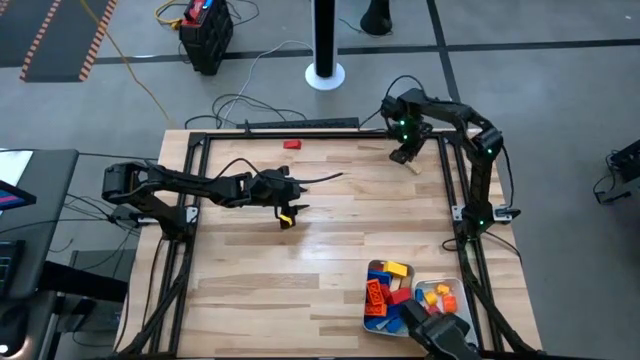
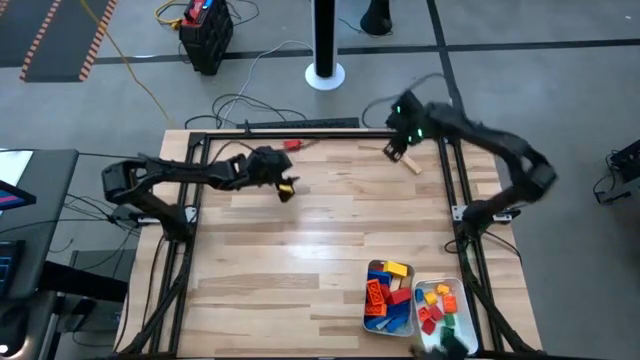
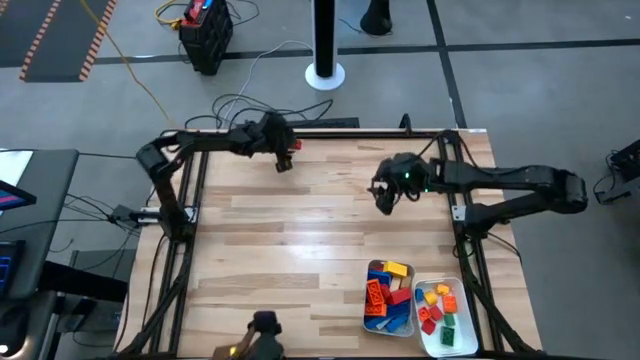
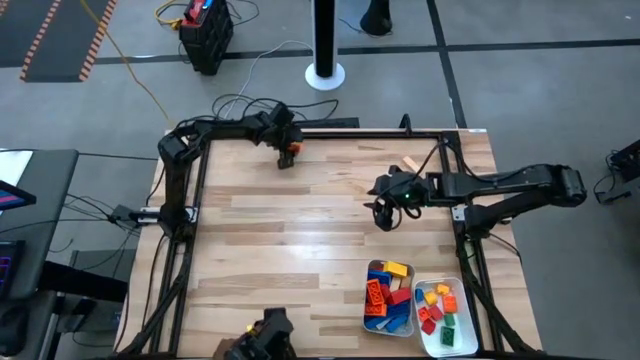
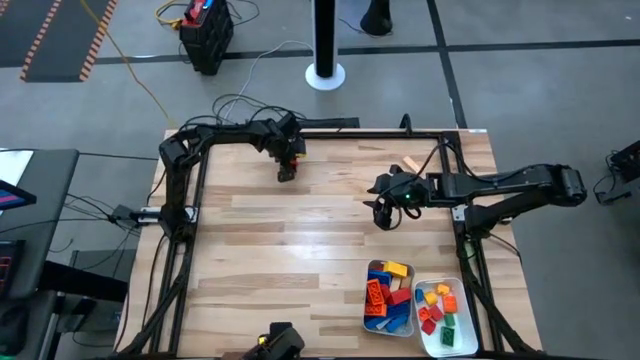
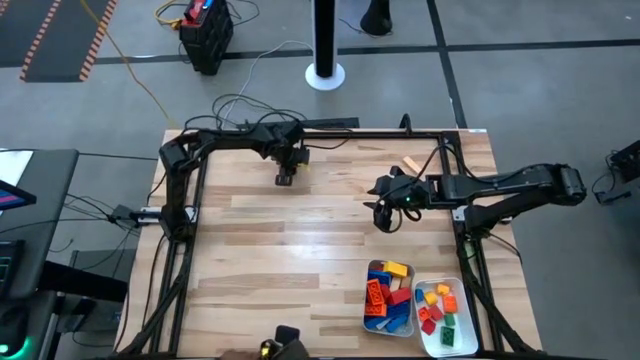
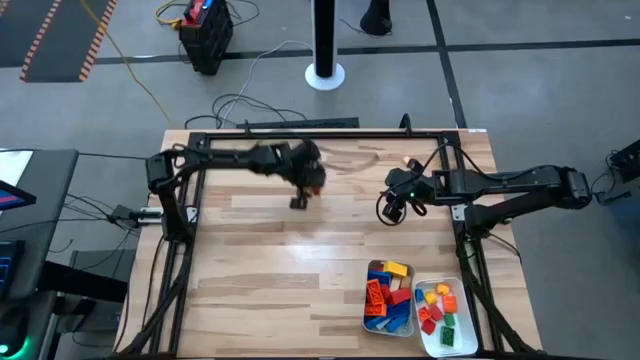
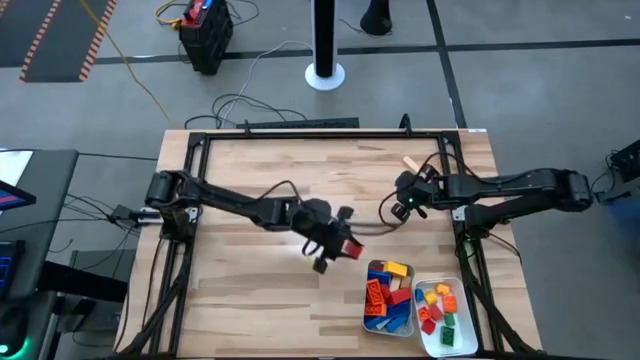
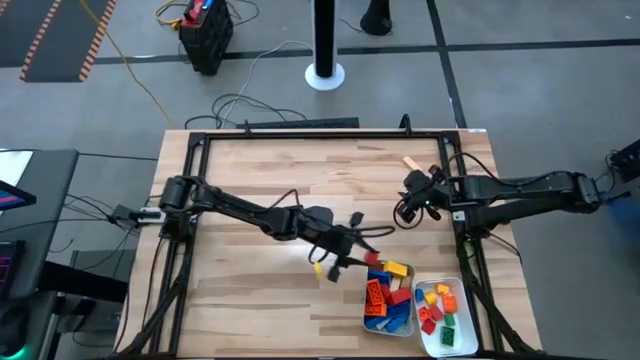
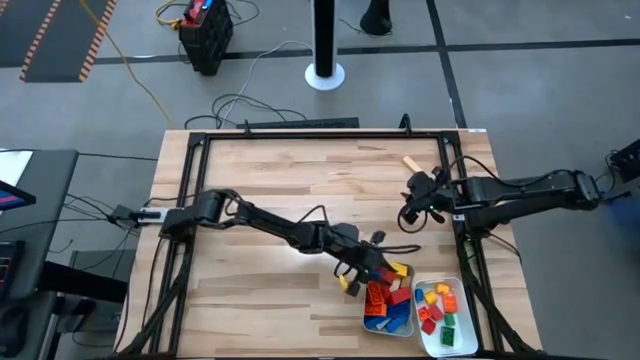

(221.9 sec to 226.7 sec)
Task: Sort blocks by size
Put the large red wooden block into the gray bin

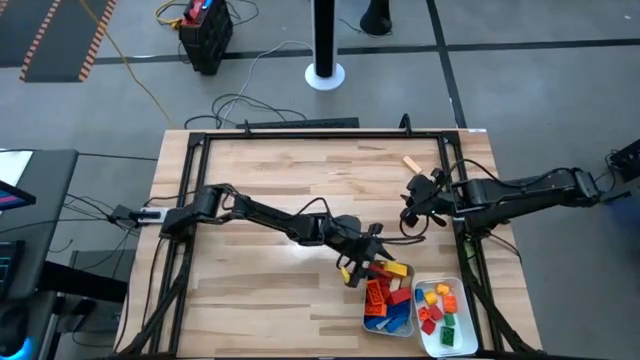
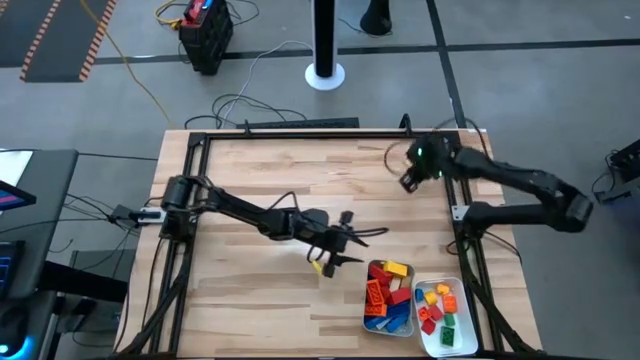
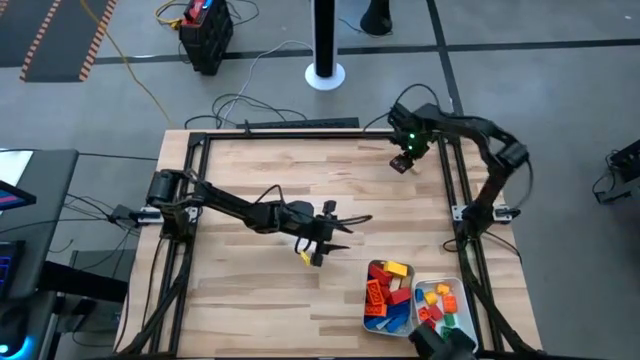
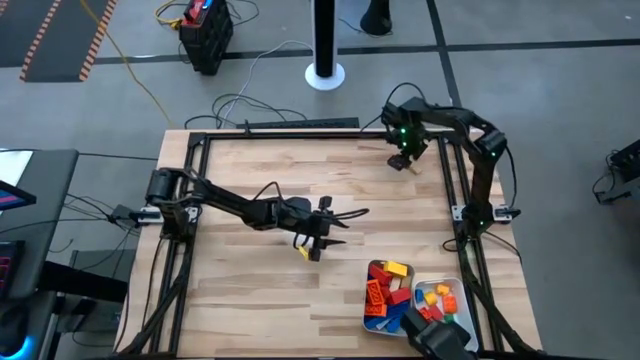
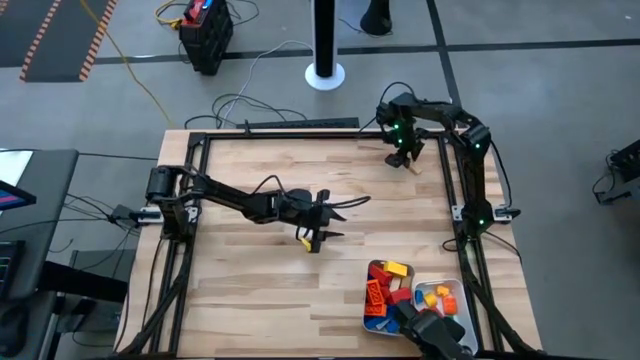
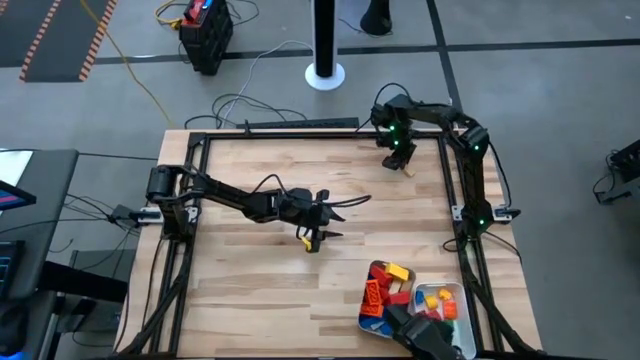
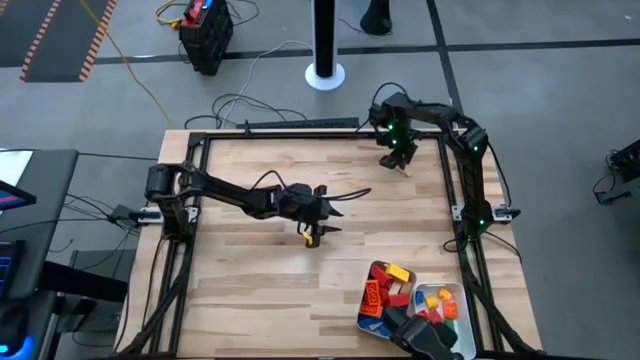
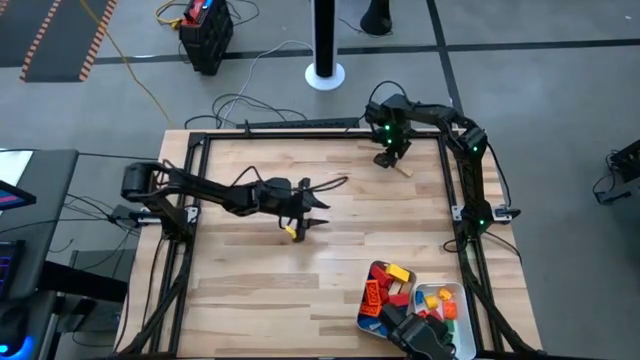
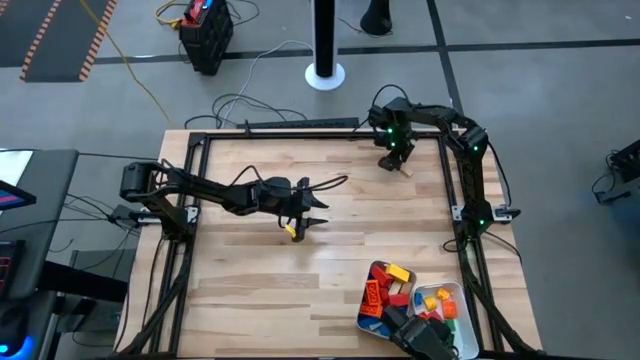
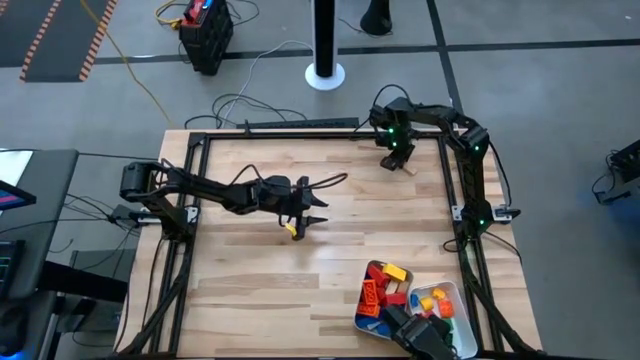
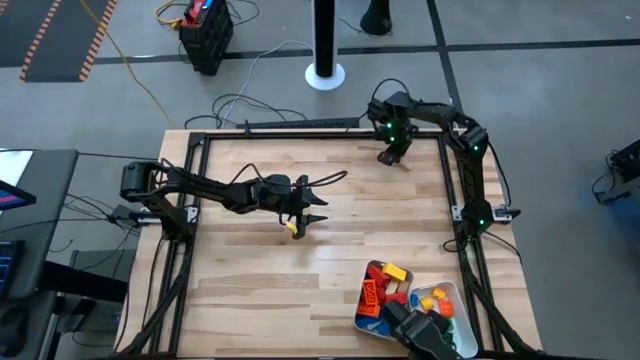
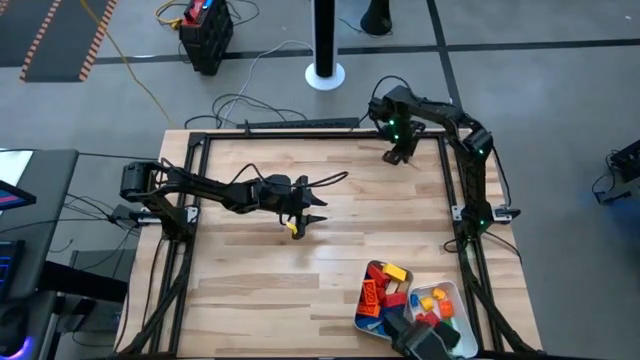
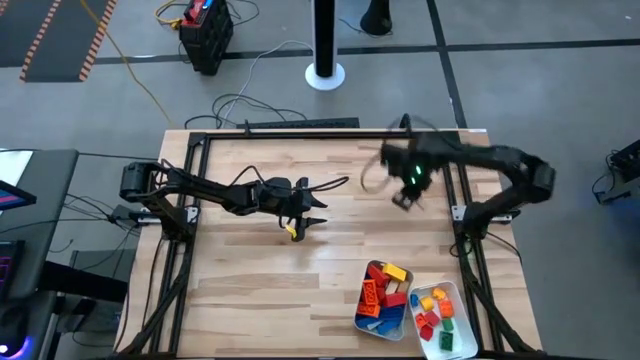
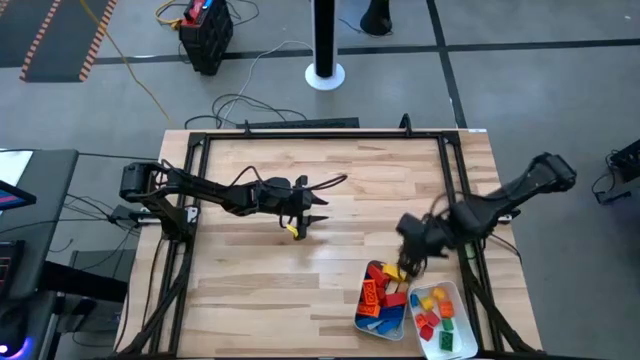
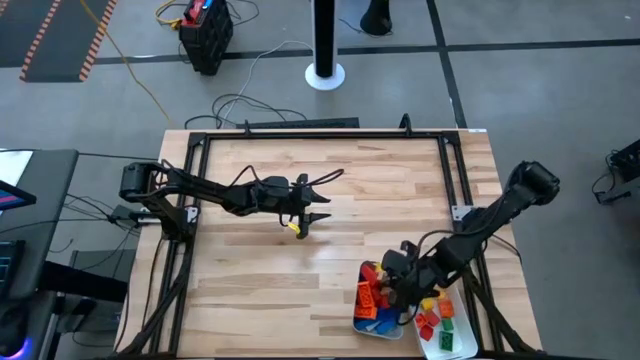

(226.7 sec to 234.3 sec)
Put the large light brown wooden block into the gray bin

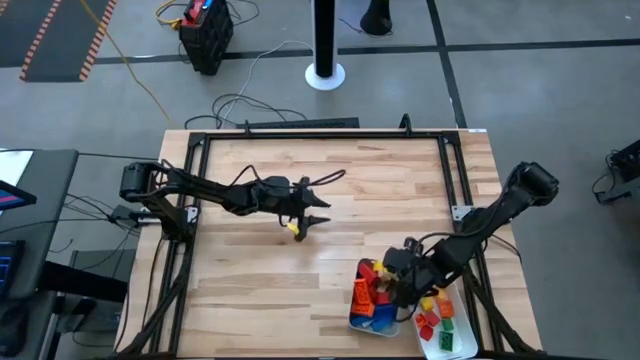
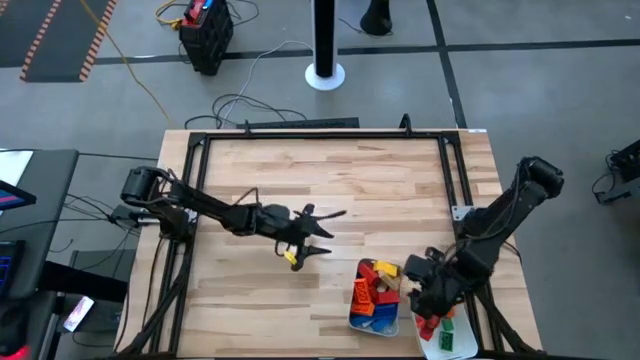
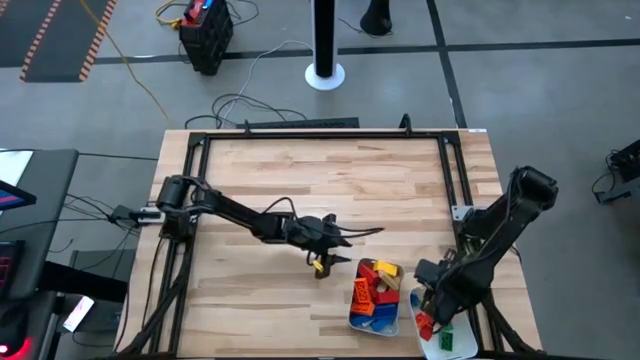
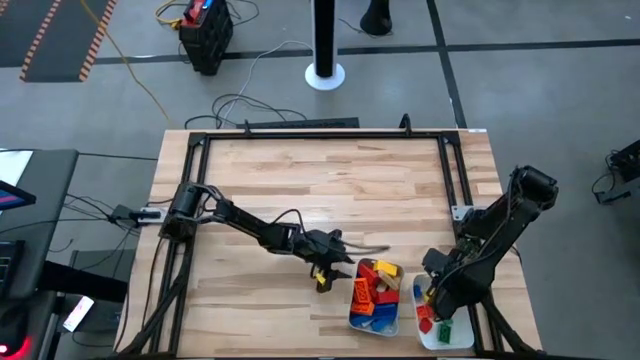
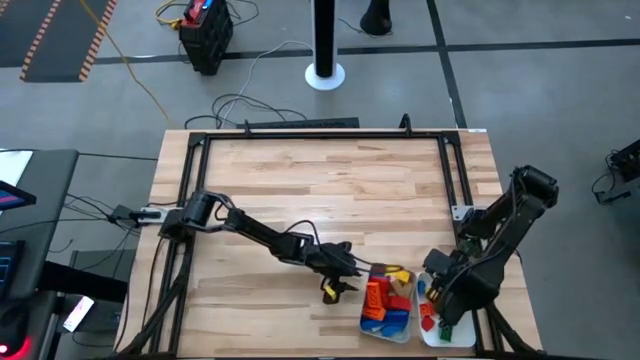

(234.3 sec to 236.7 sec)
Adjust the bins

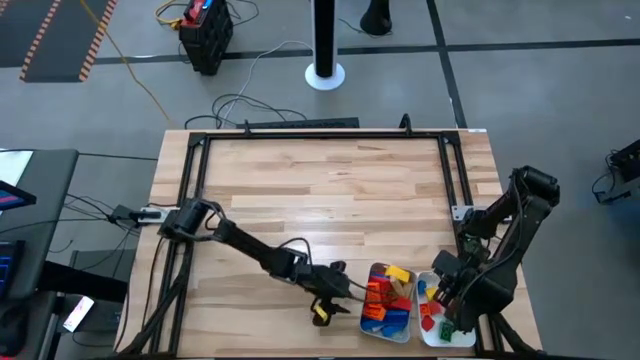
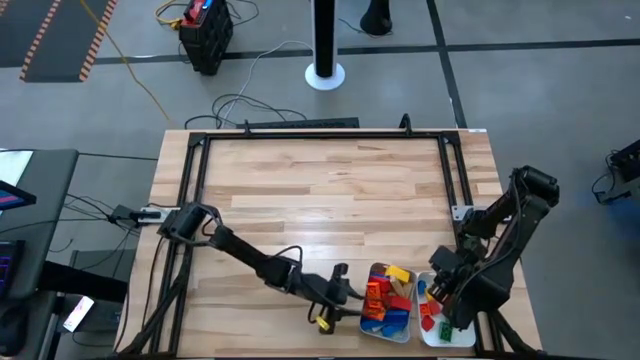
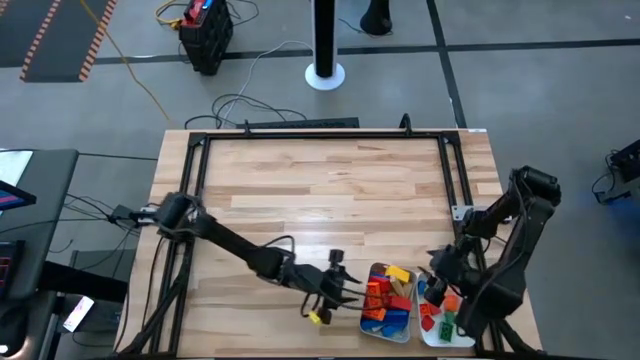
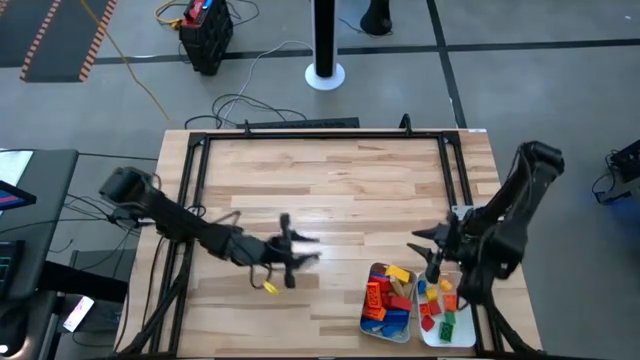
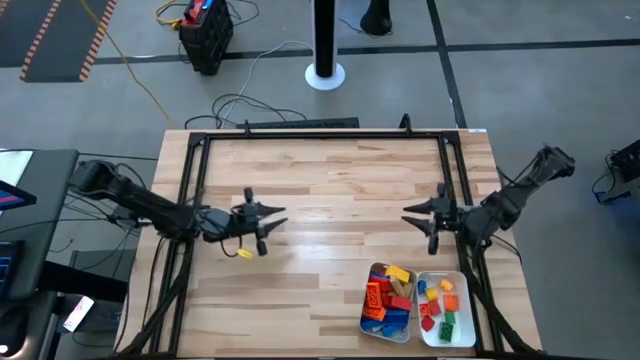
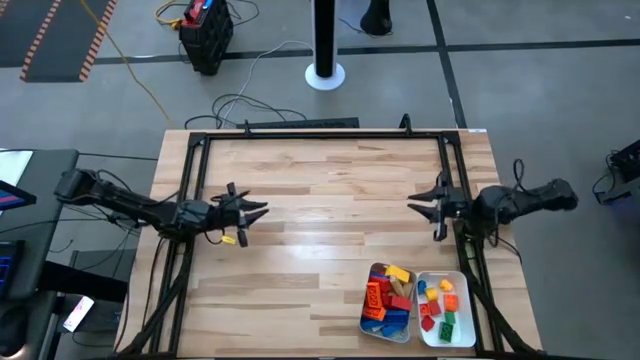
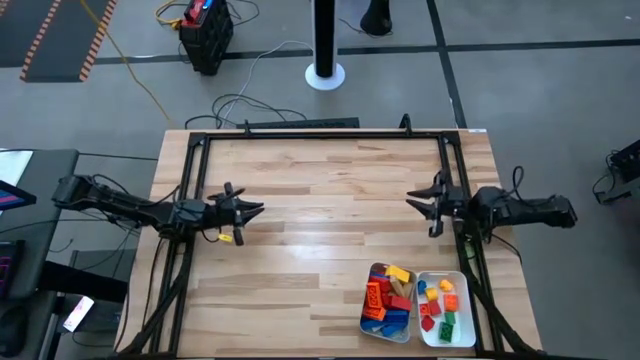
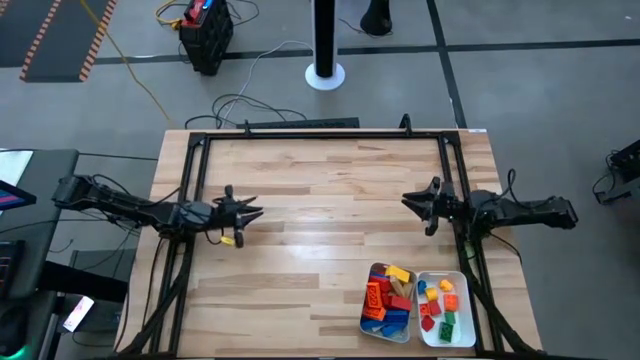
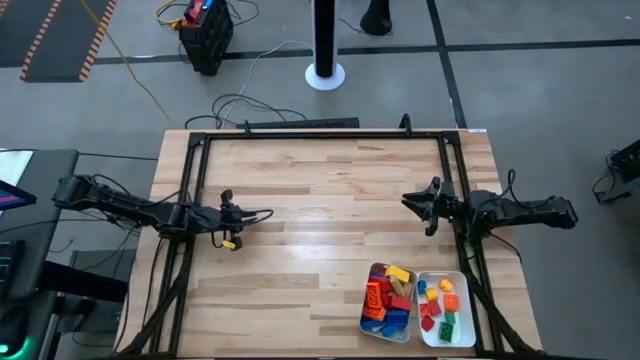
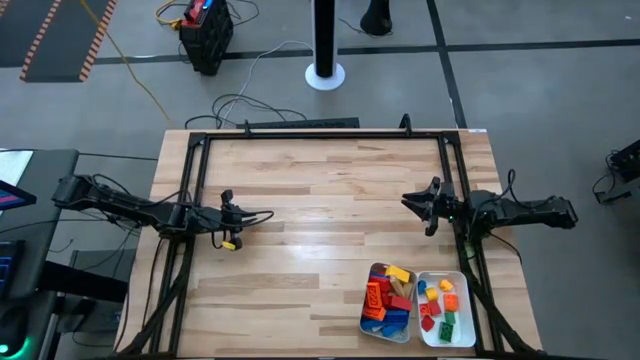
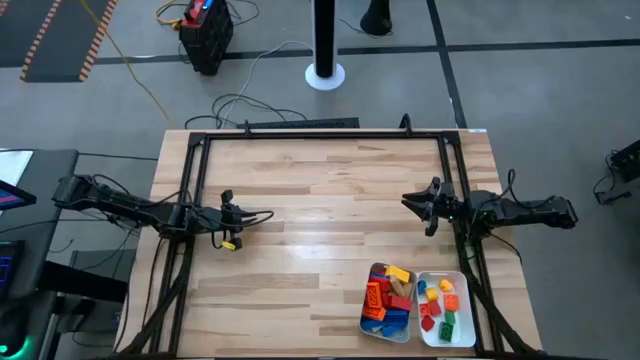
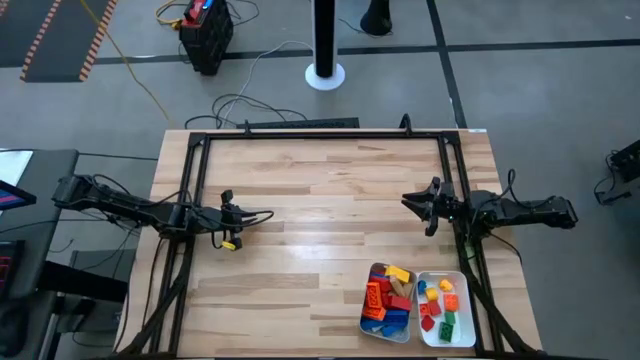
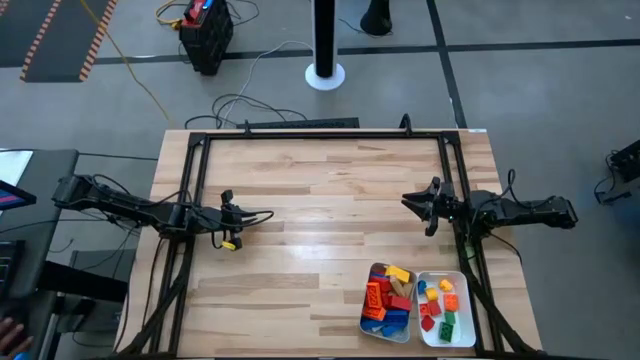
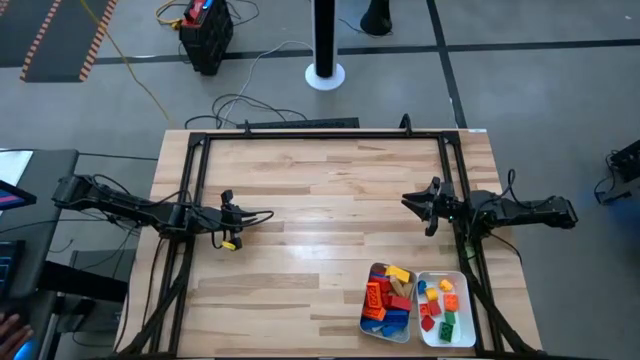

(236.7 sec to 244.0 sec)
Return to Home Position
